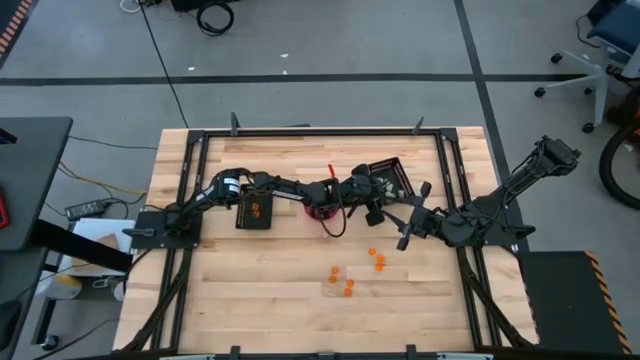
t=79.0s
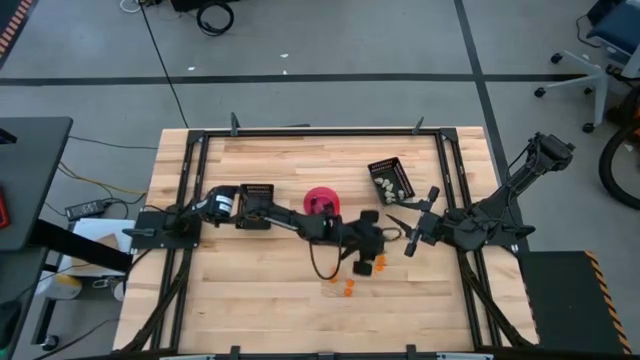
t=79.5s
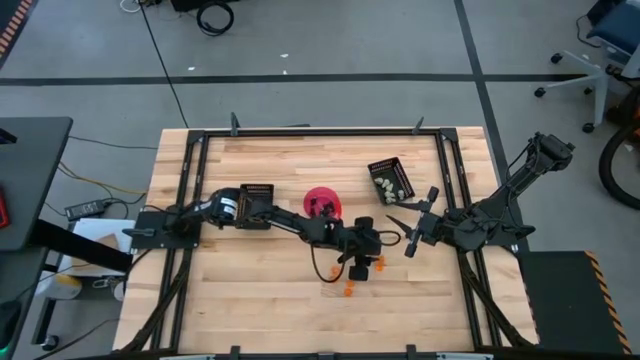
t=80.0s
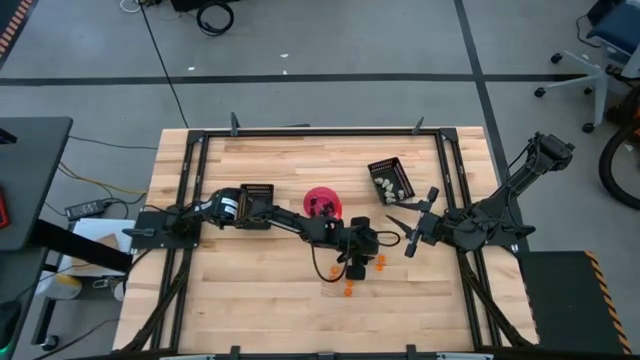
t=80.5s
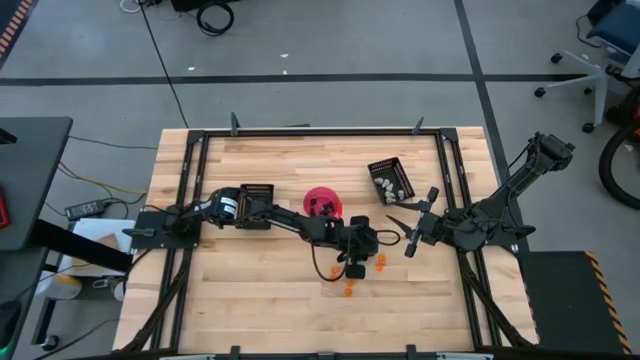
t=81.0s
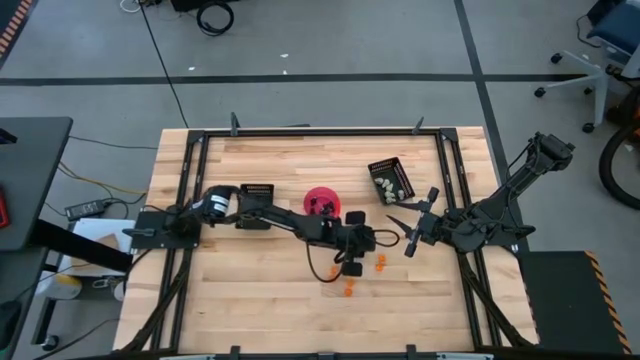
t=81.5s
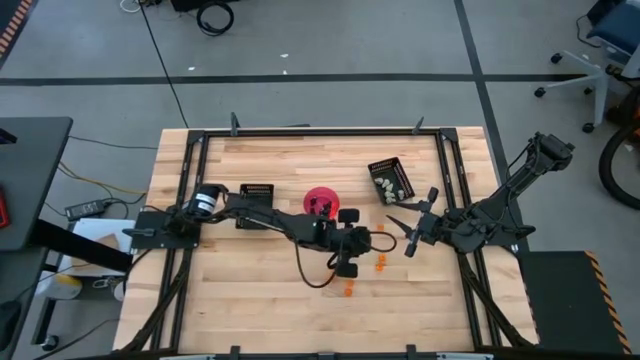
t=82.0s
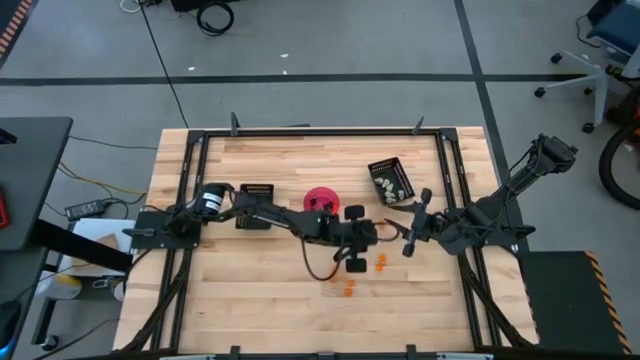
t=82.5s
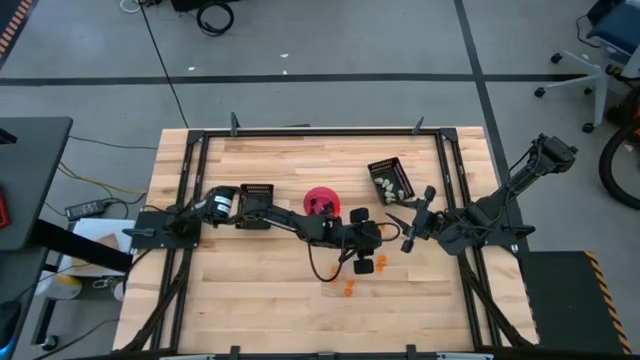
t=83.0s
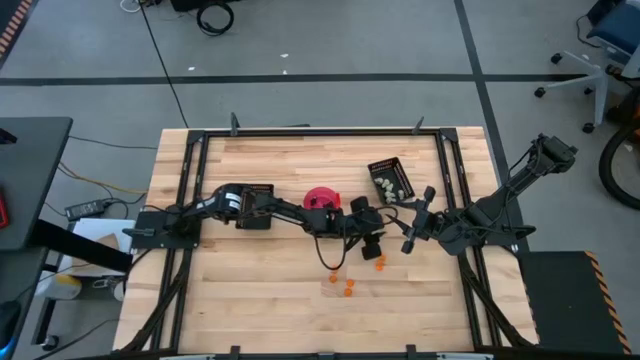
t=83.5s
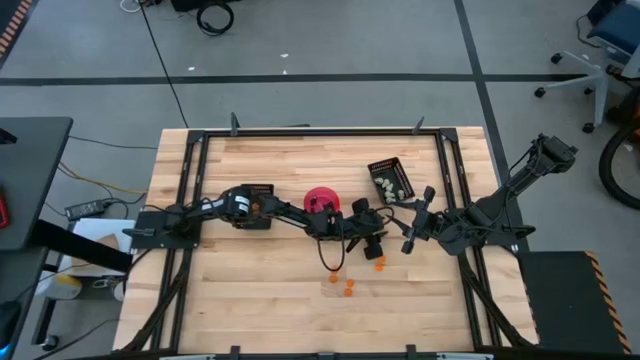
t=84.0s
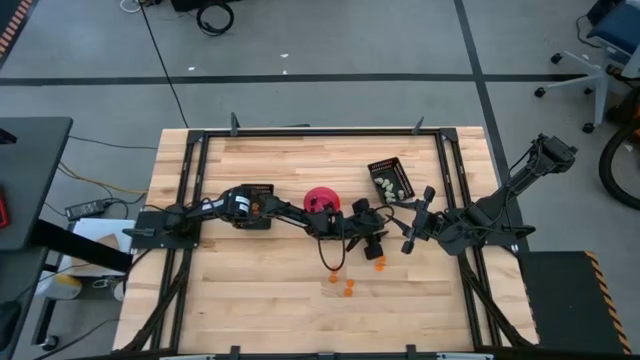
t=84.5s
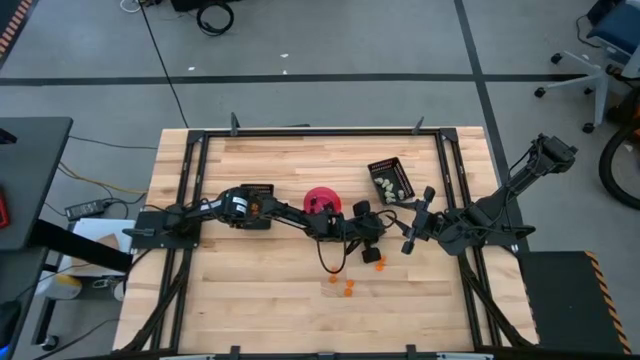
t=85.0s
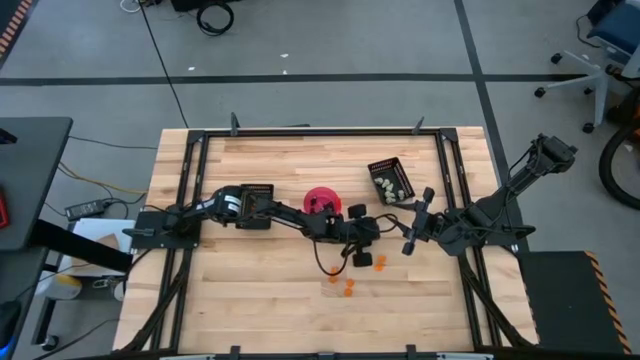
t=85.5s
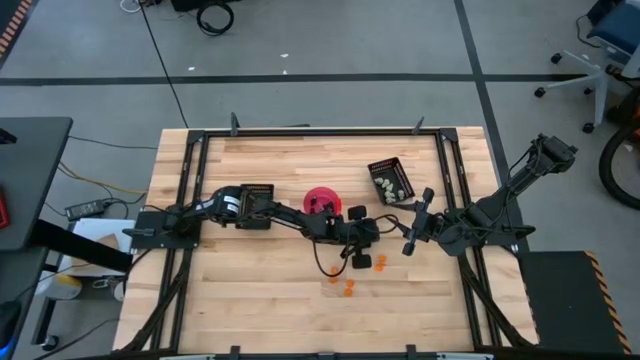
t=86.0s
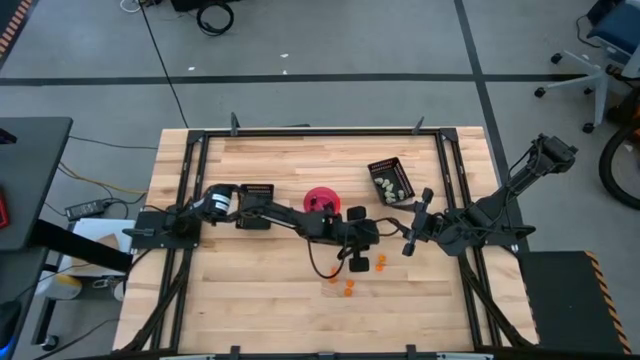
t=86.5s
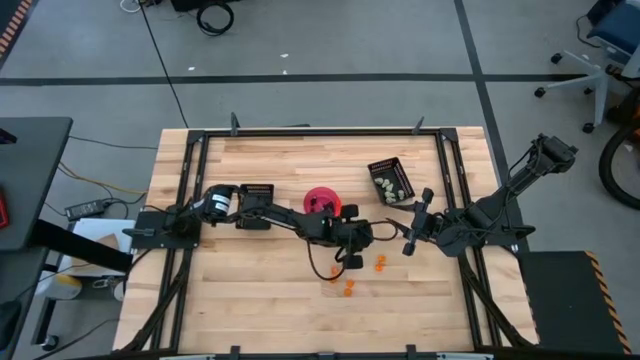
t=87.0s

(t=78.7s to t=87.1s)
Task: Sort Halloween decoration
Put the orange pumpkin toy into the left black bin

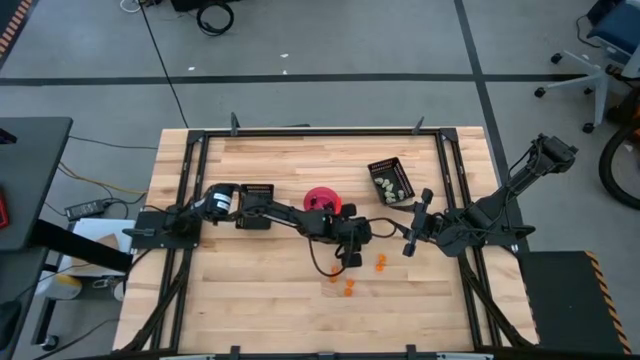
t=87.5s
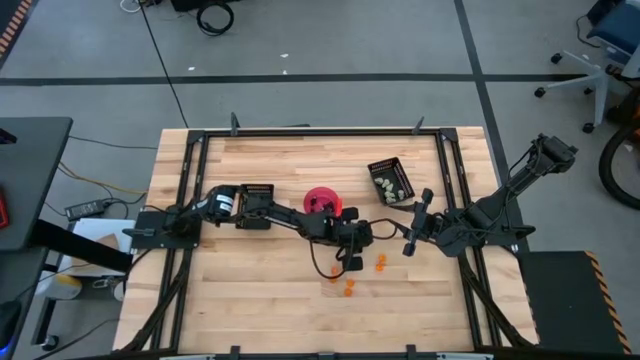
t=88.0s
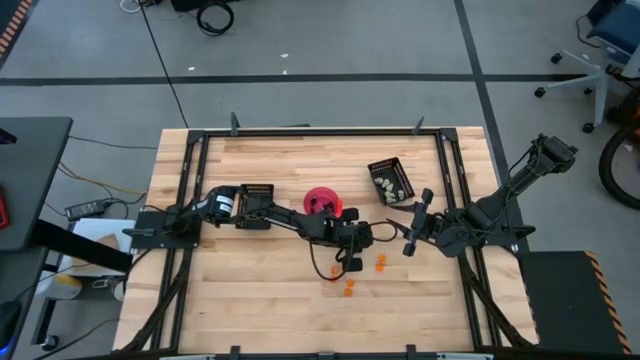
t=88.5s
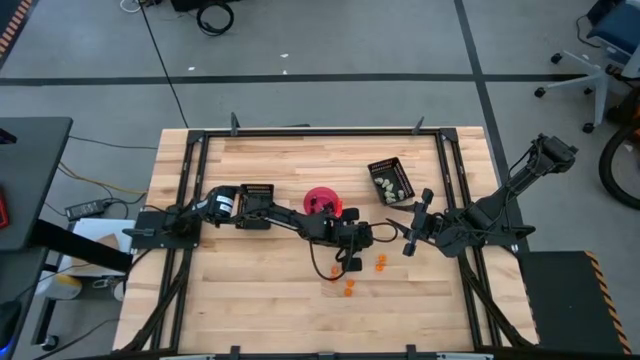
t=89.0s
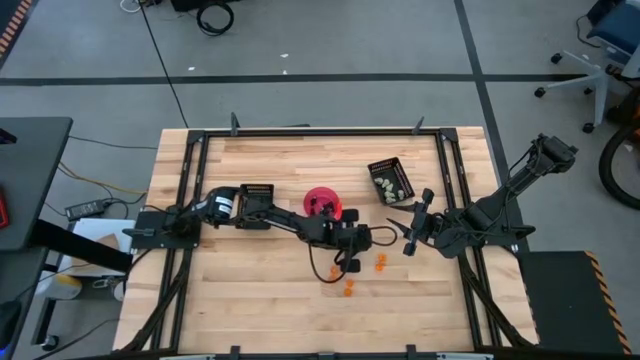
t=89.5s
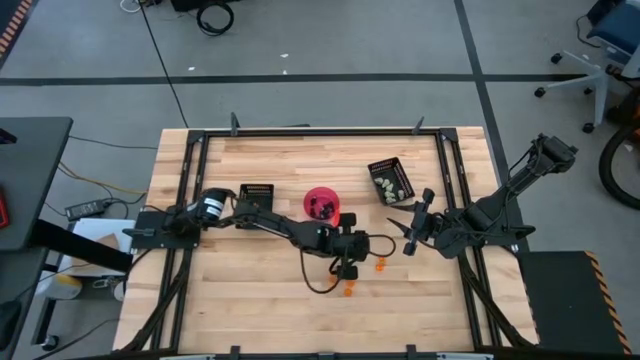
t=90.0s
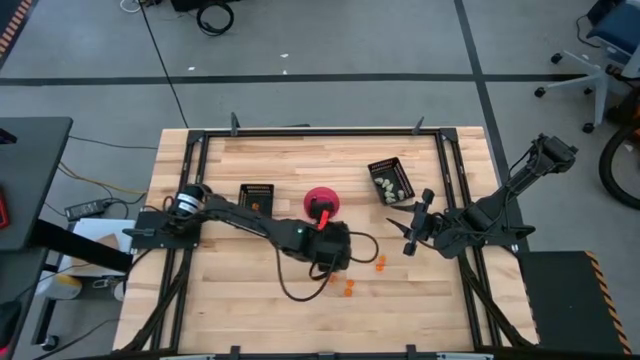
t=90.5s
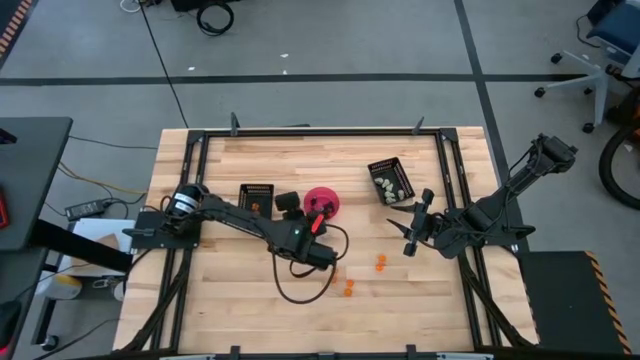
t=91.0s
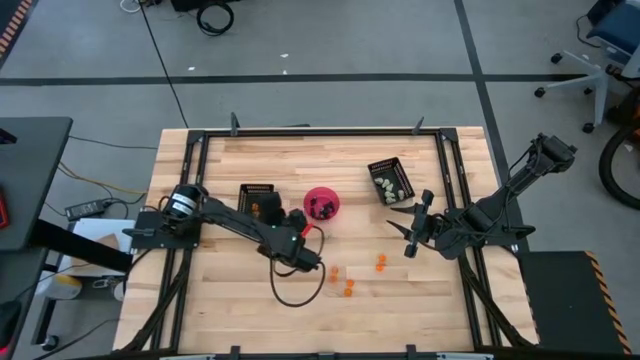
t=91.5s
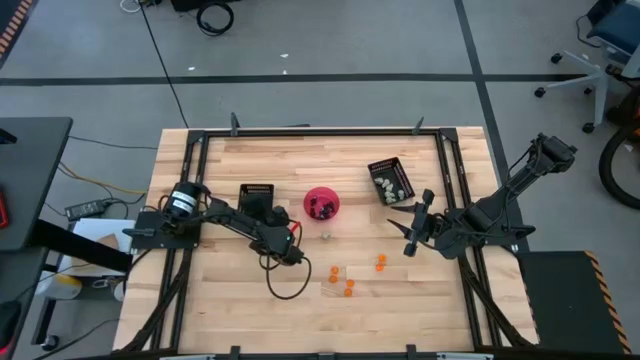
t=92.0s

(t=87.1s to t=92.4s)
Put the orange pumpkin toy into the left black bin

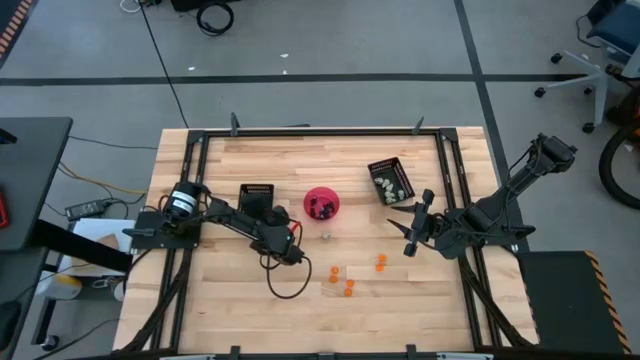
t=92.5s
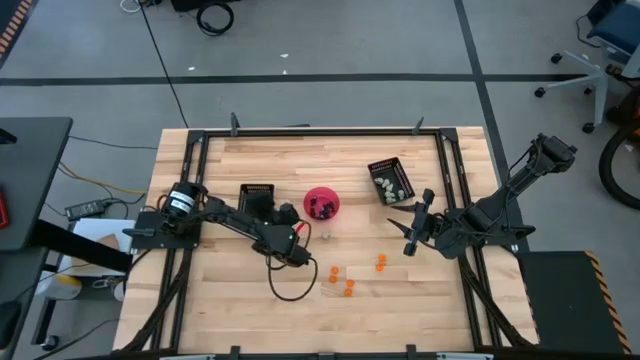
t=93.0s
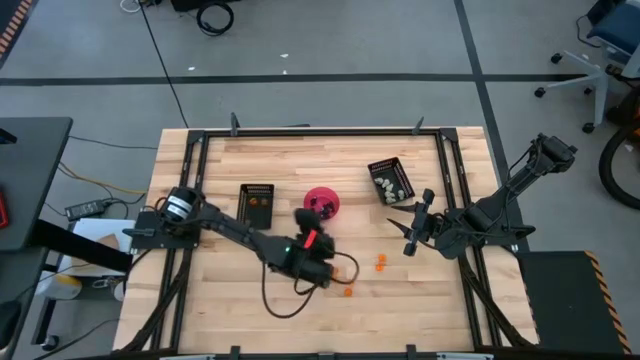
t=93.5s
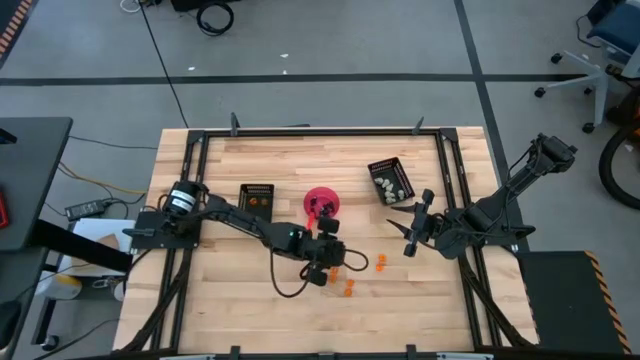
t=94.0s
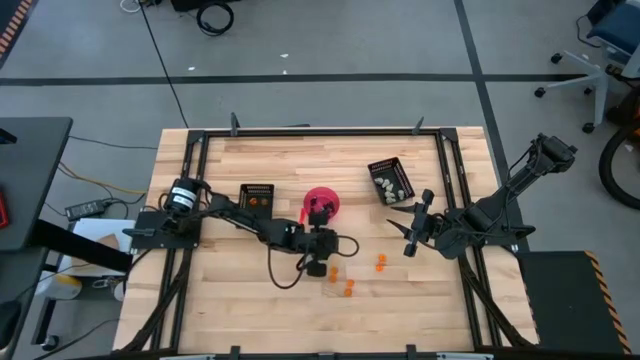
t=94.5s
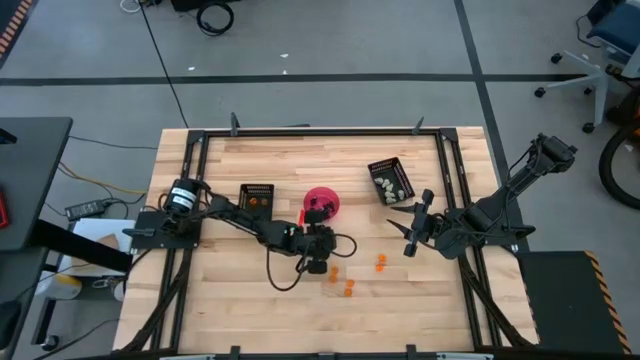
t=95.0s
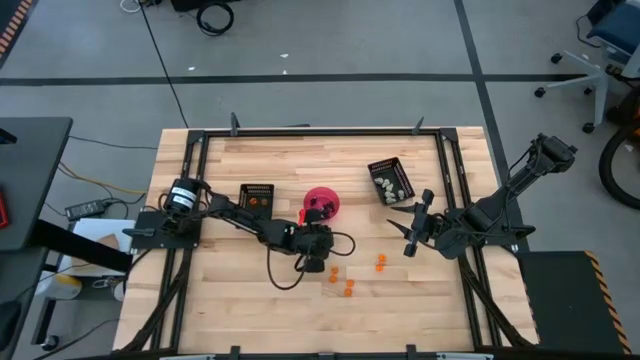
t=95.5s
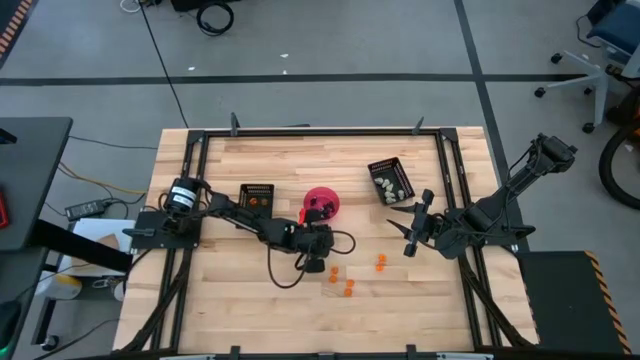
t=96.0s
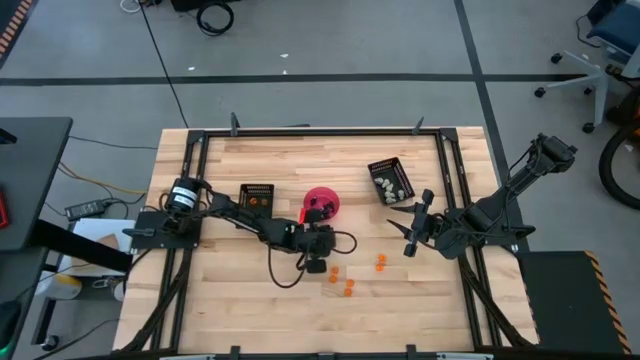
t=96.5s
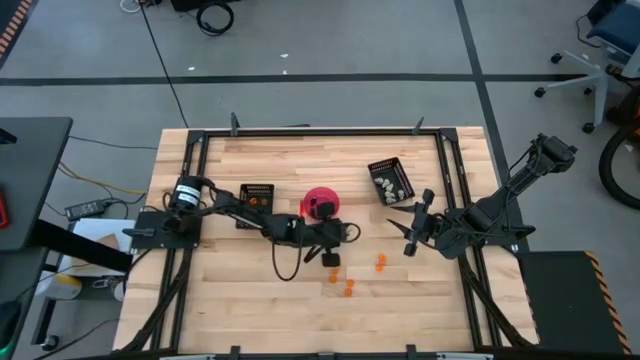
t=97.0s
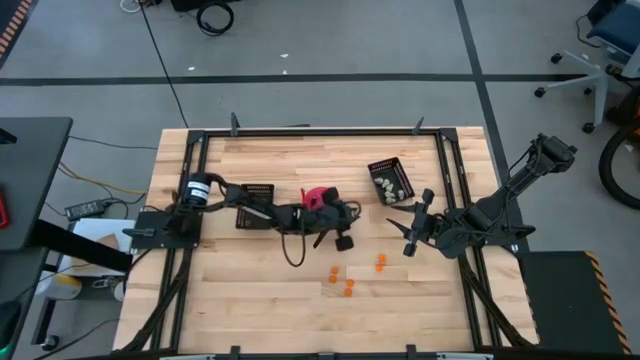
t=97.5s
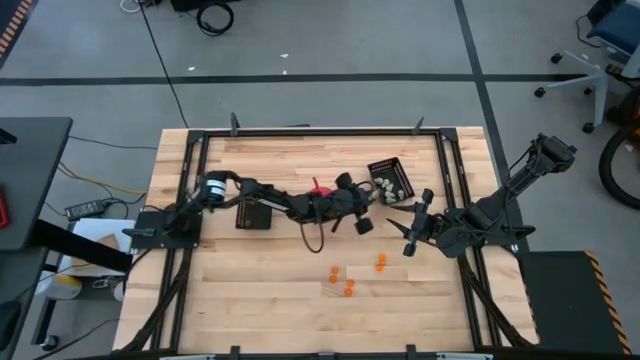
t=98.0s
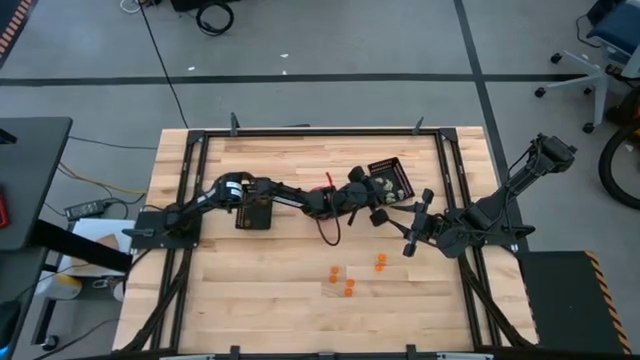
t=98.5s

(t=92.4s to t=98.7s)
Put the white skull toy into the right black bin

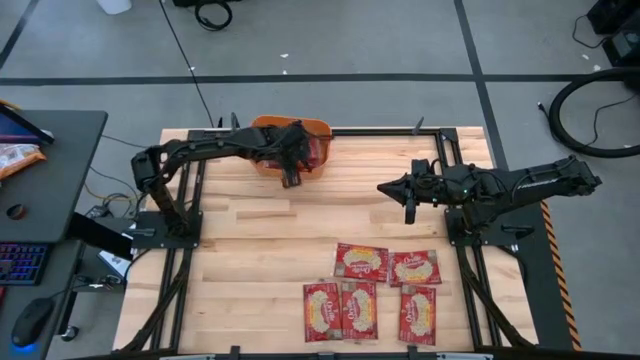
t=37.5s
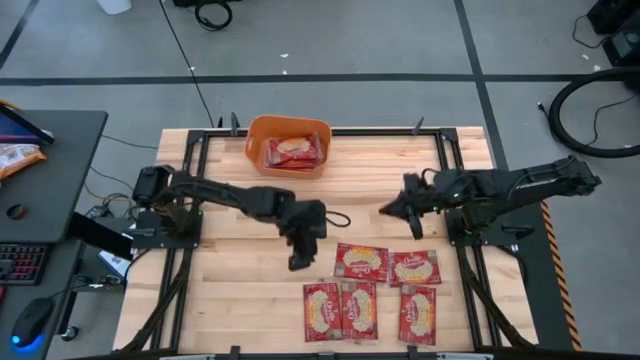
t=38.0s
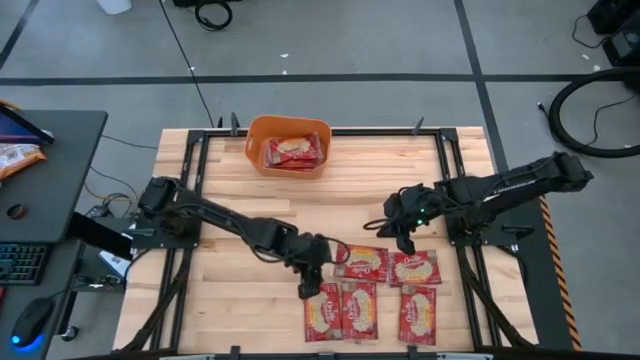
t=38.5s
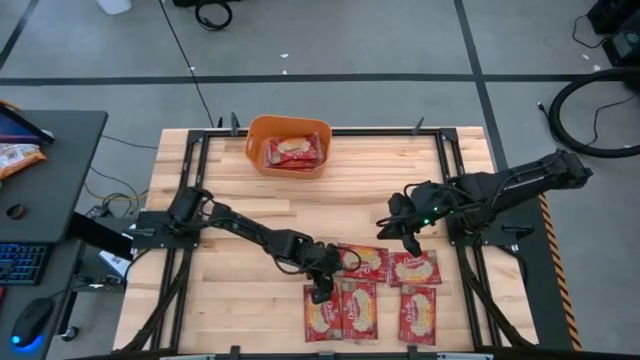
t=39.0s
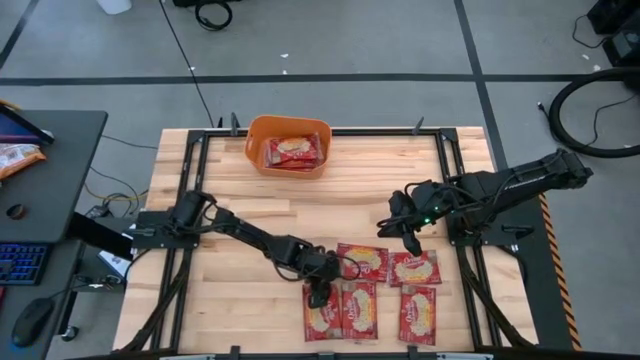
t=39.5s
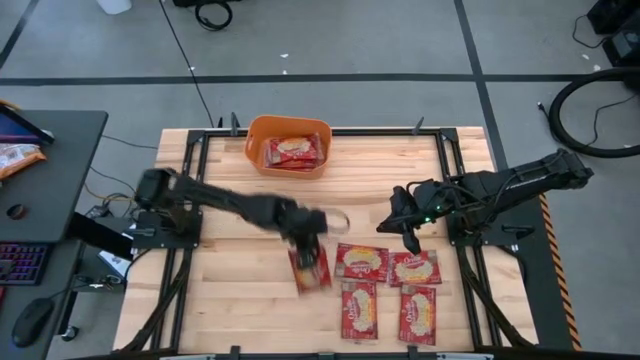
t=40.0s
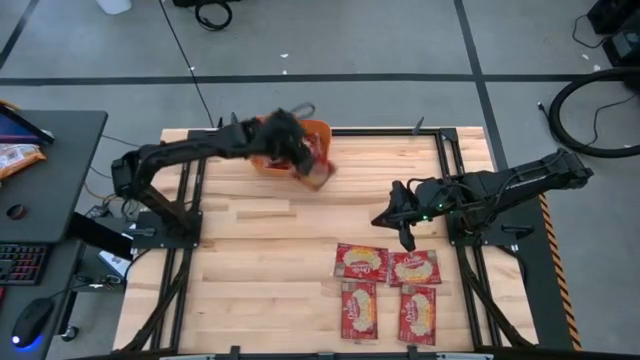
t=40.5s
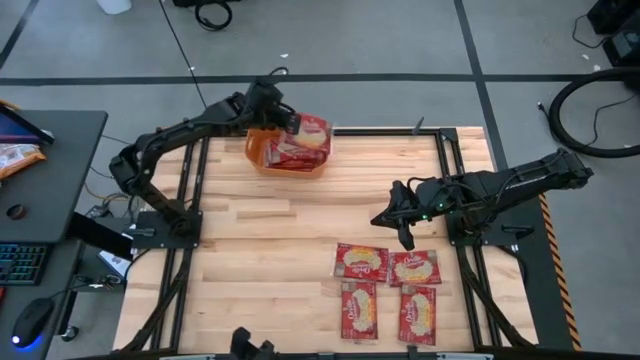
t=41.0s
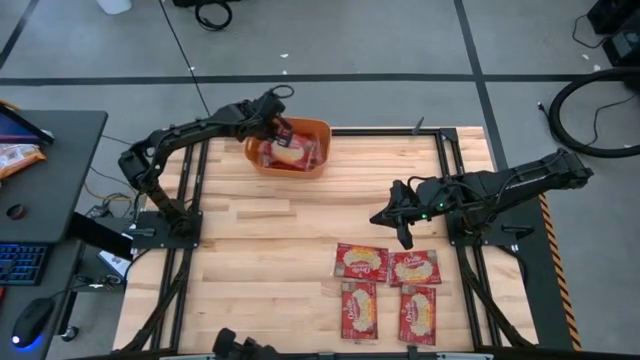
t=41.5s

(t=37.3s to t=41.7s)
Task: Sort popcorn bags into baskets
Put the red popcorn bag into the orange container
